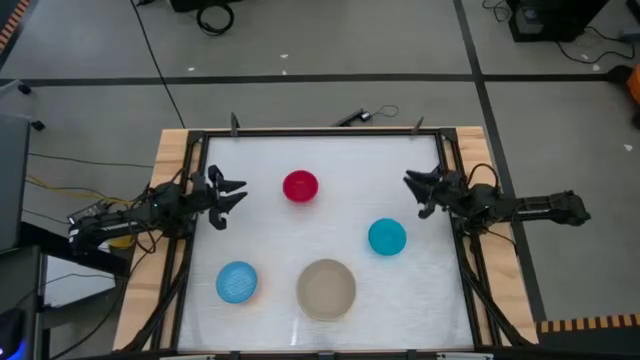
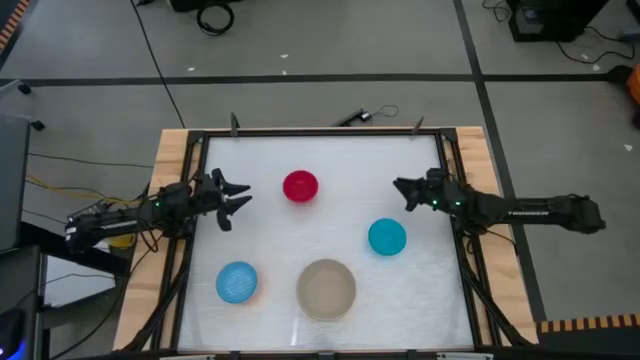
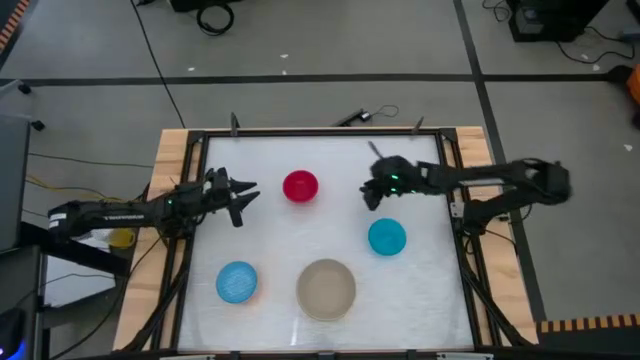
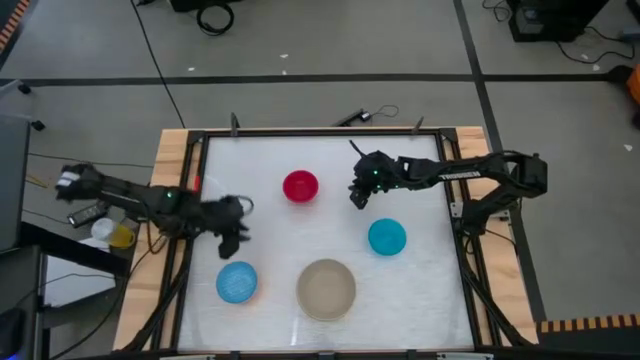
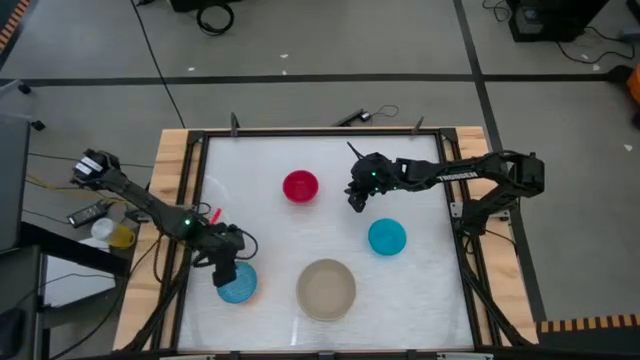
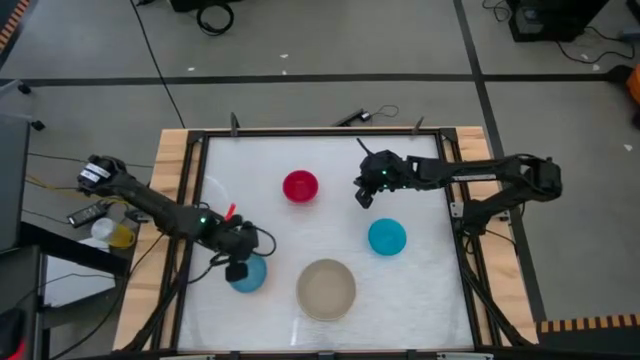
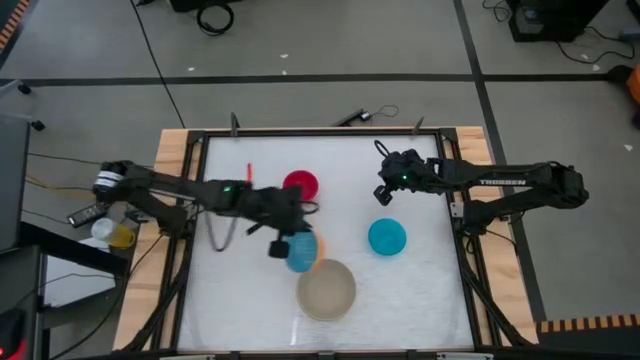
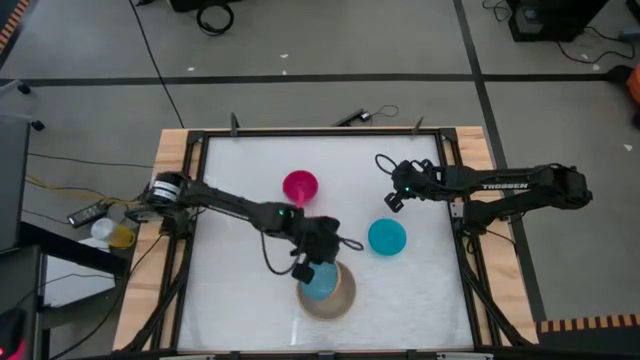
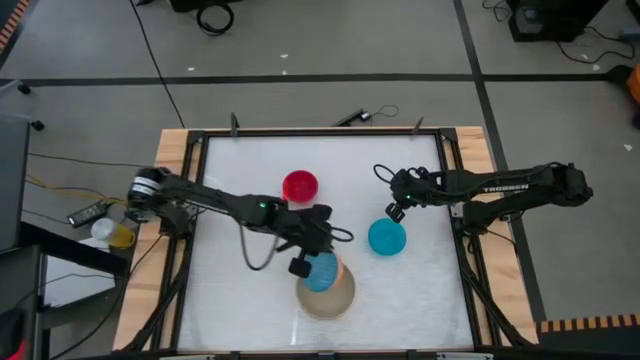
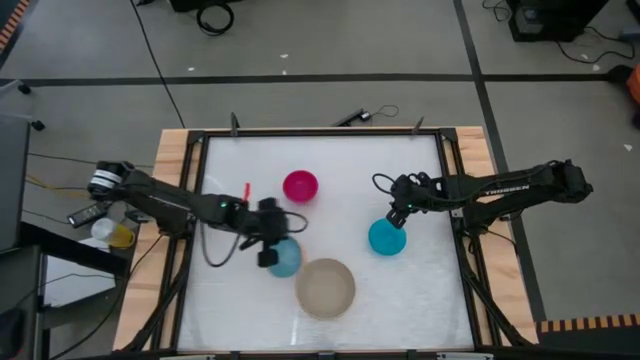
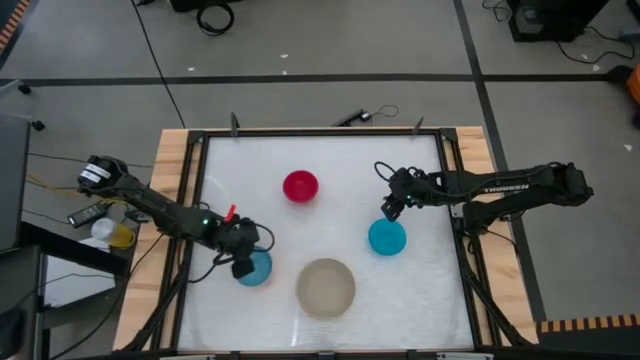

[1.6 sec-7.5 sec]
Stack the blue patterned bowl on top of the gray bowl

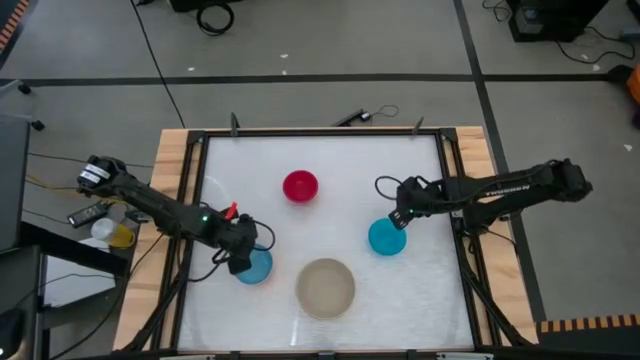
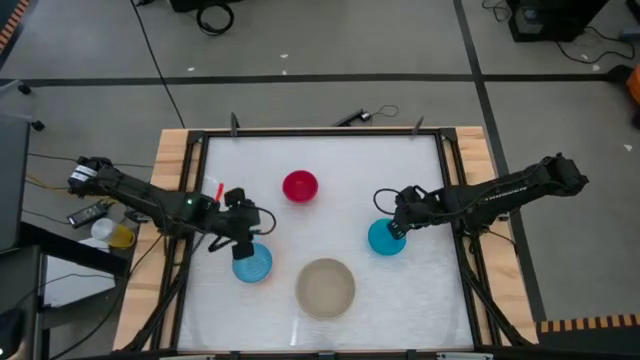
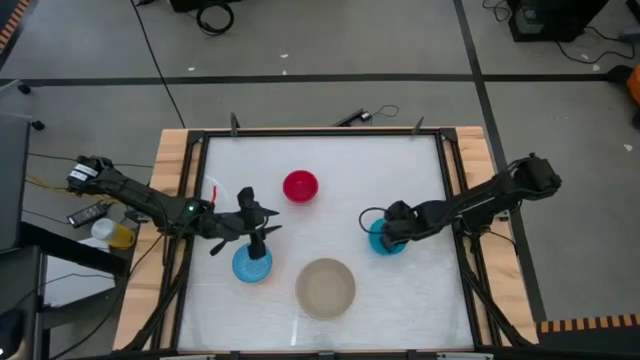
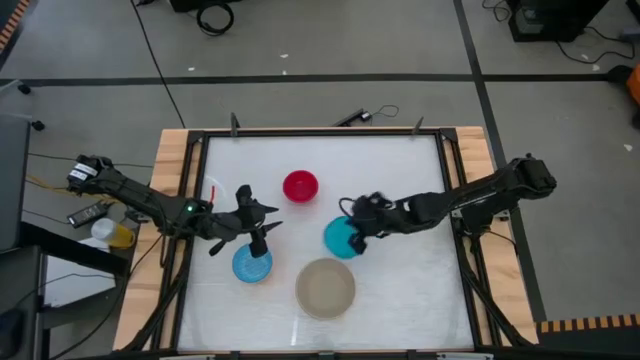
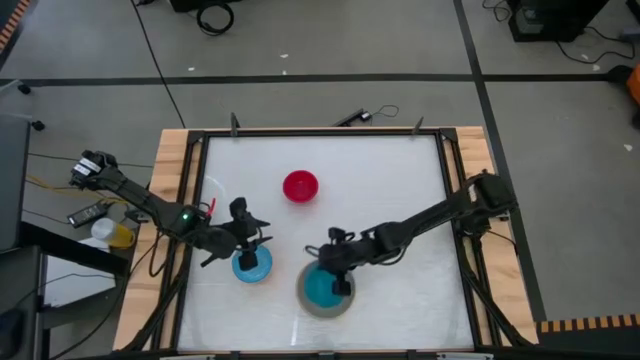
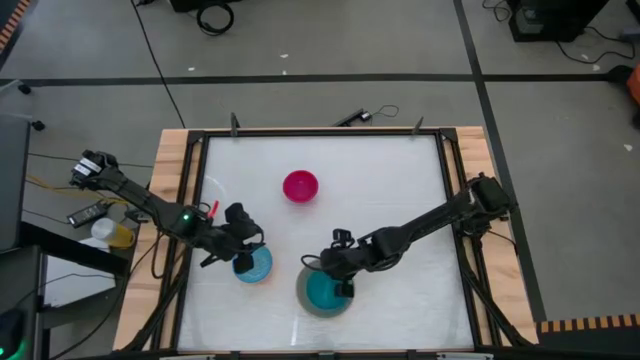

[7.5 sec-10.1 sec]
Stack the blue transparent bowl on top of the gray bowl

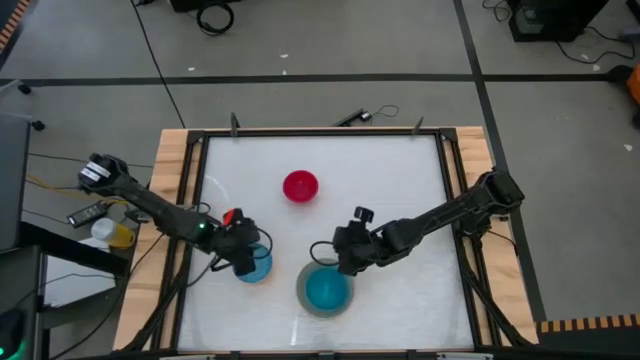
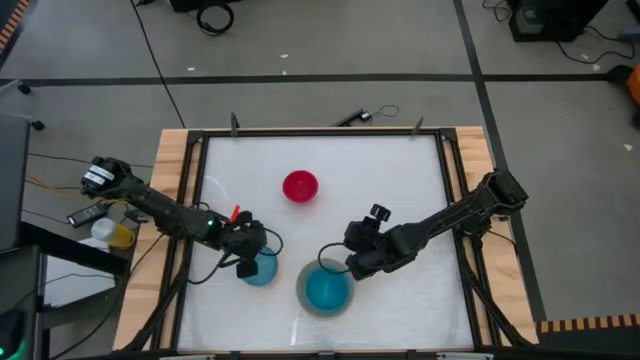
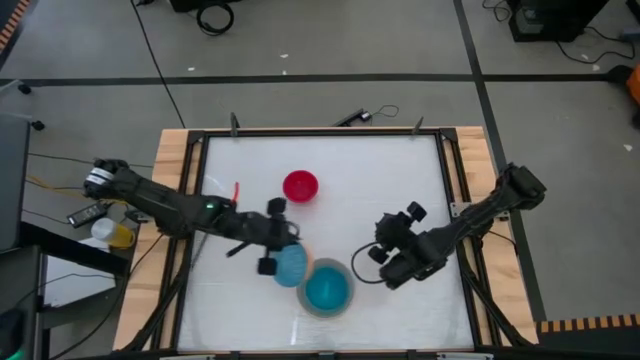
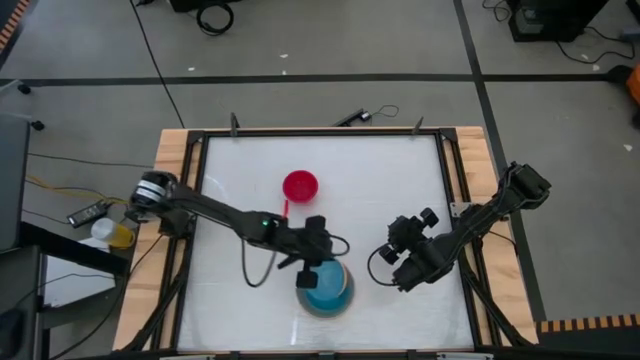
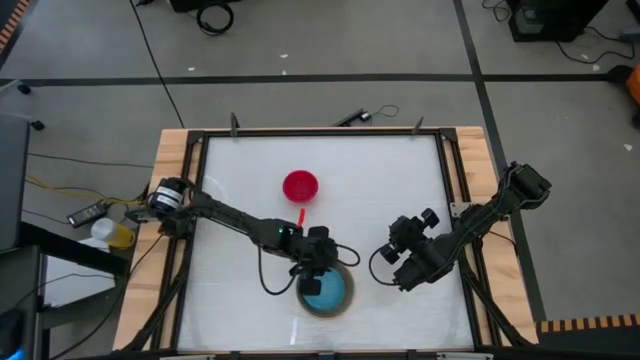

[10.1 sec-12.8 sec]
Stack the blue patterned bowl on top of the blue transparent bowl

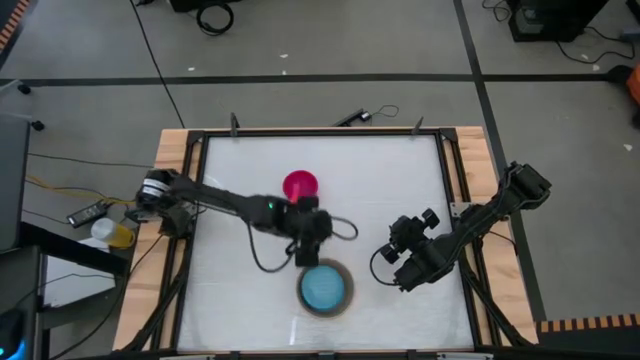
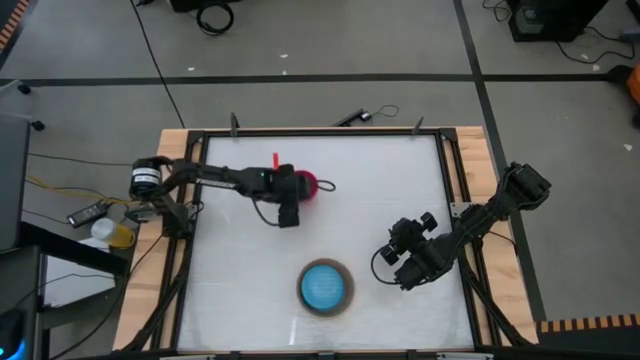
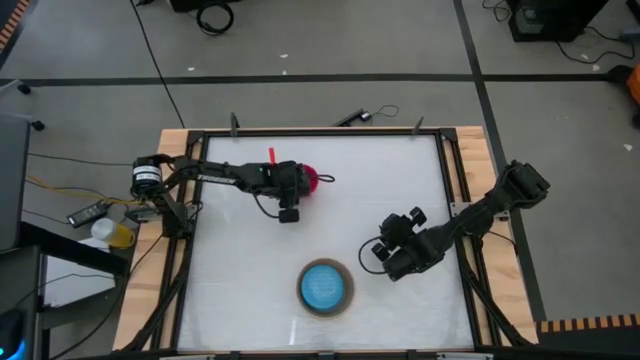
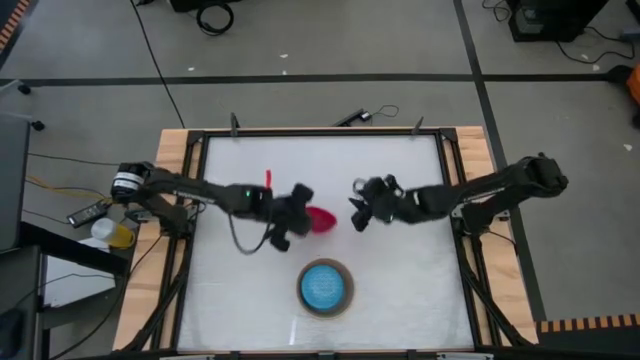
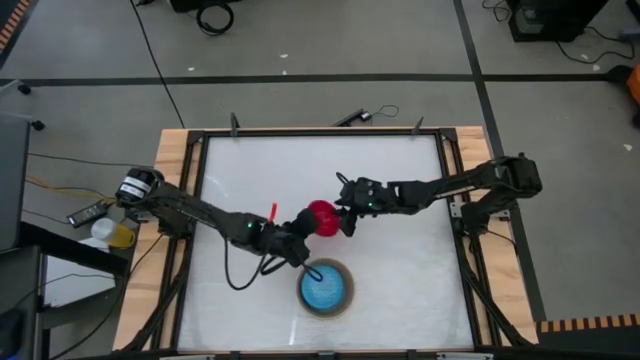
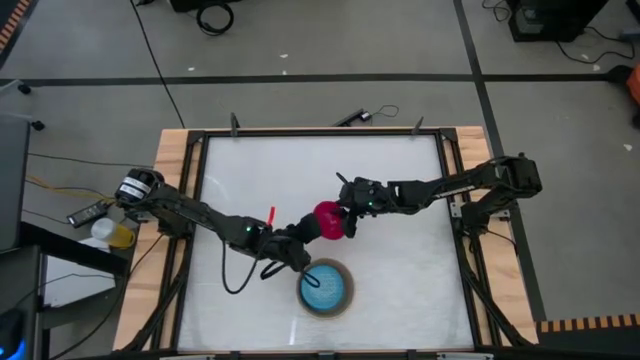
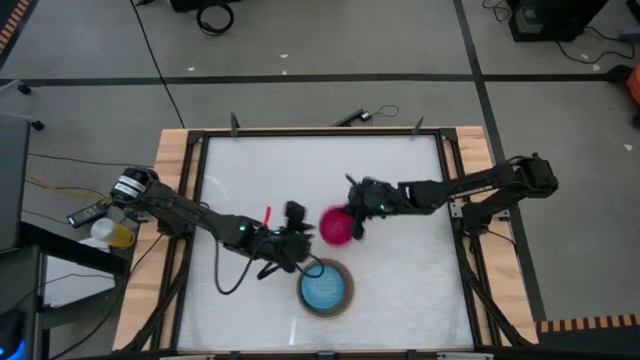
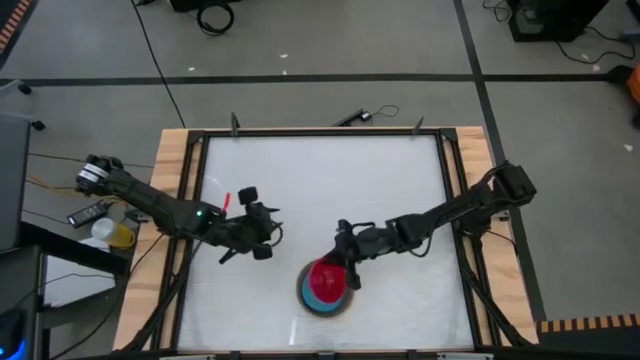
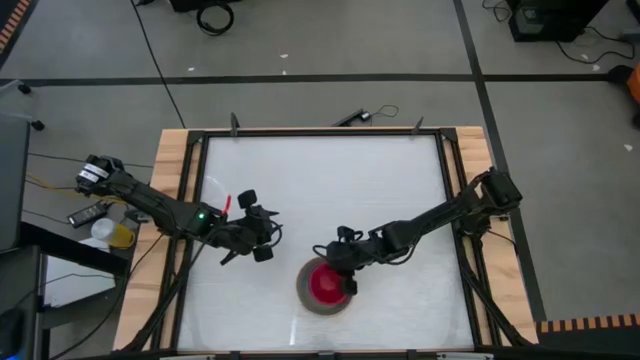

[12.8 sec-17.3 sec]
Stack the red bowl on top of the blue patterned bowl

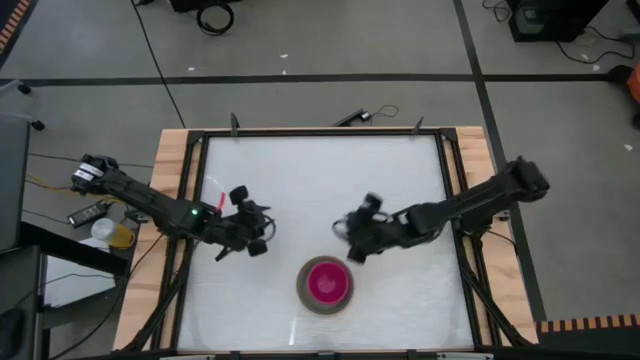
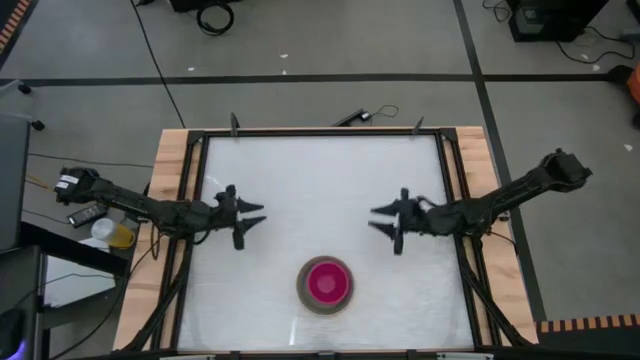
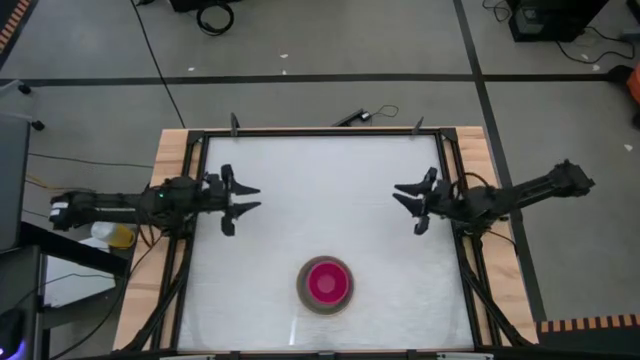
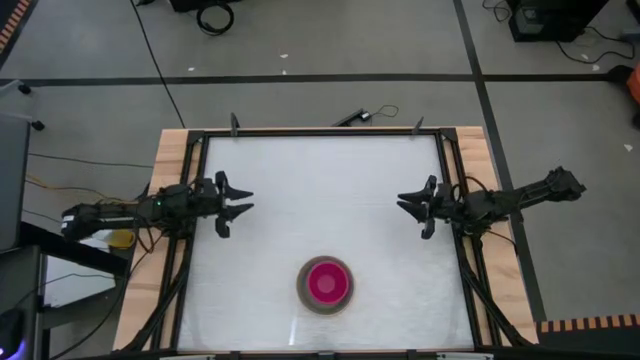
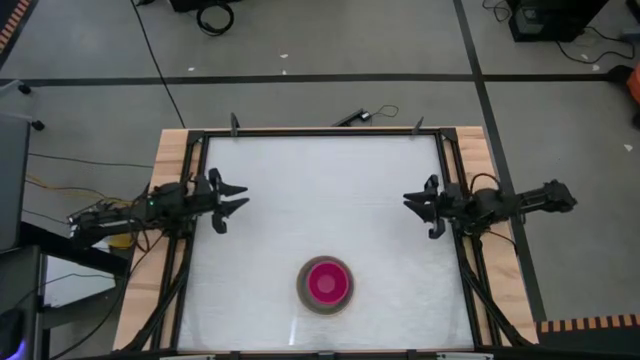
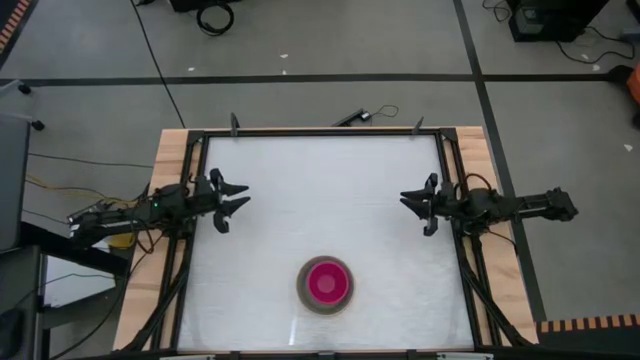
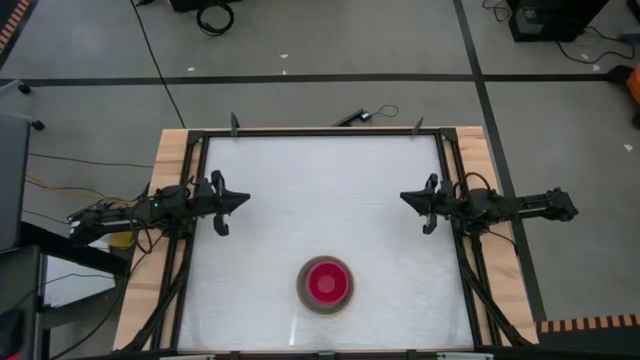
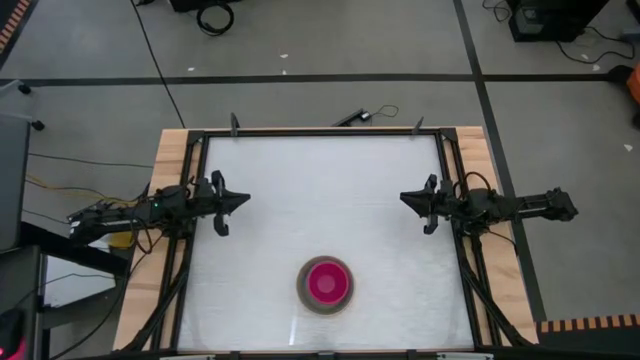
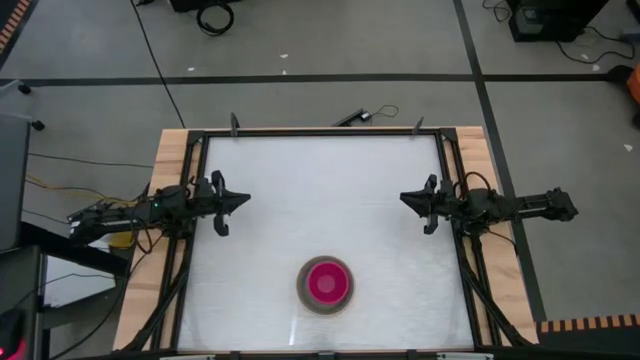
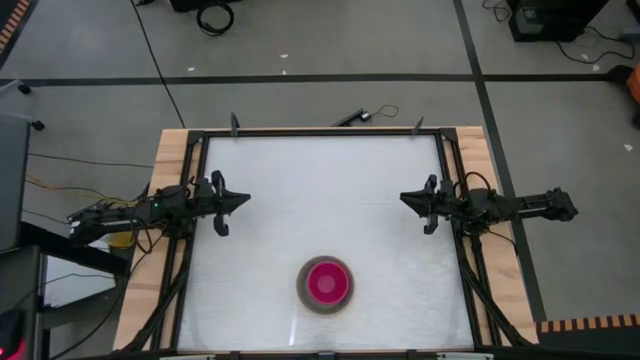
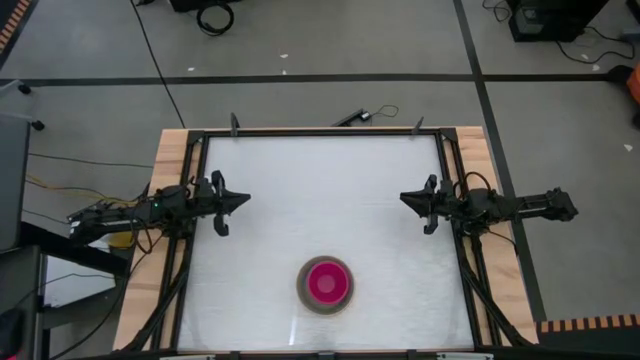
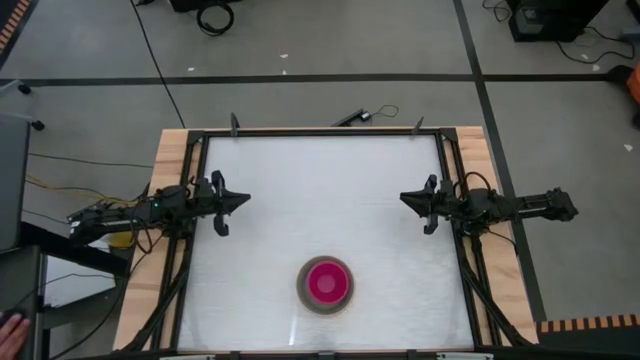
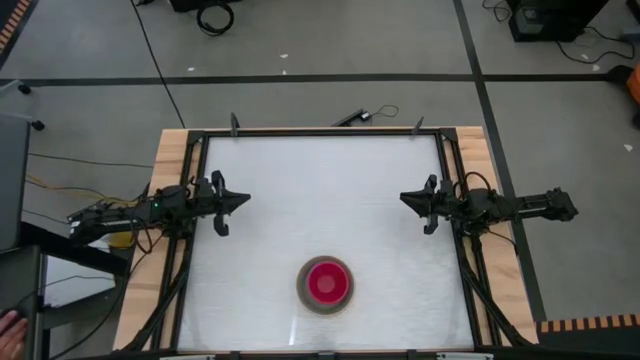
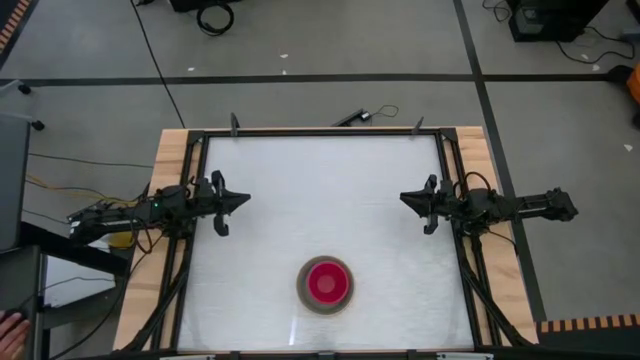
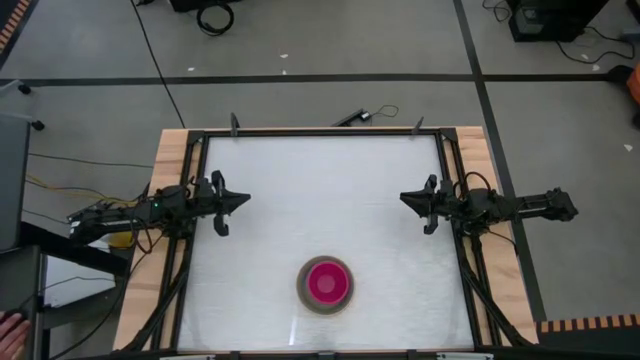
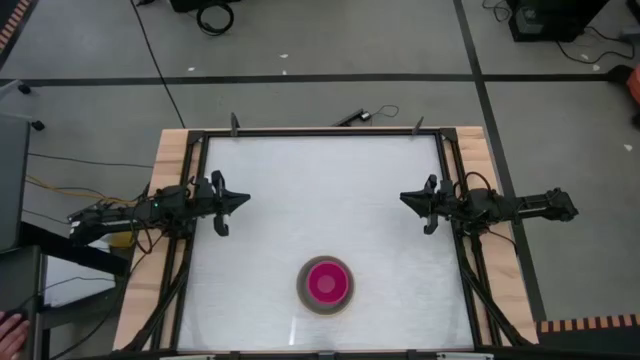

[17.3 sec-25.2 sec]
Return to Home Position
